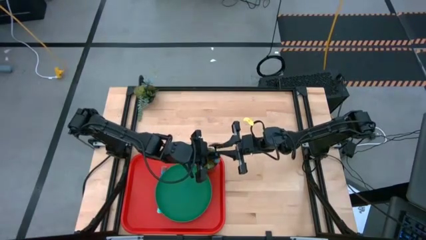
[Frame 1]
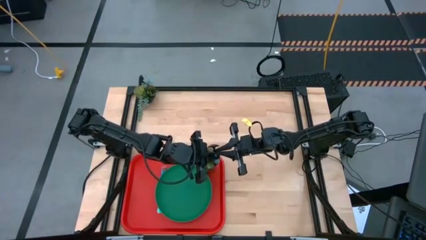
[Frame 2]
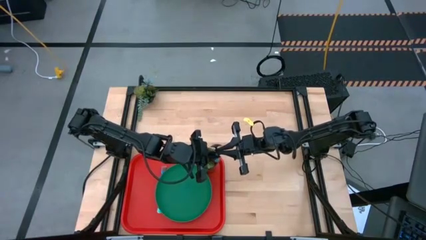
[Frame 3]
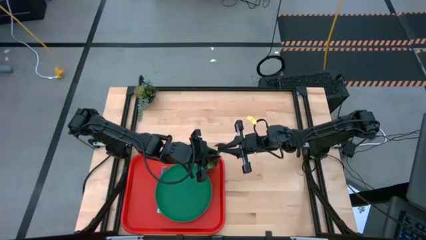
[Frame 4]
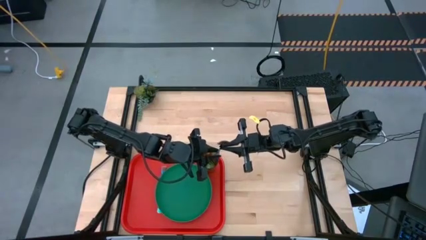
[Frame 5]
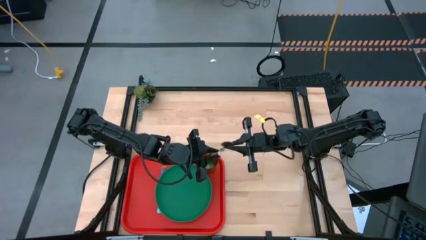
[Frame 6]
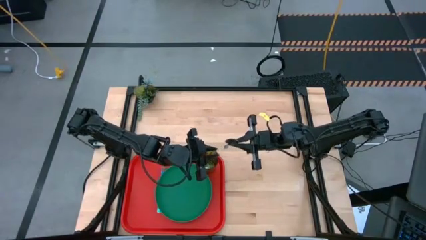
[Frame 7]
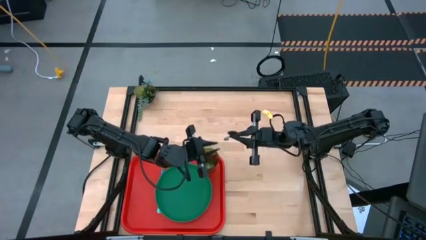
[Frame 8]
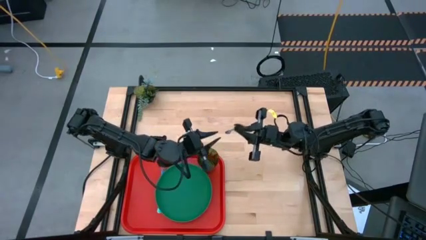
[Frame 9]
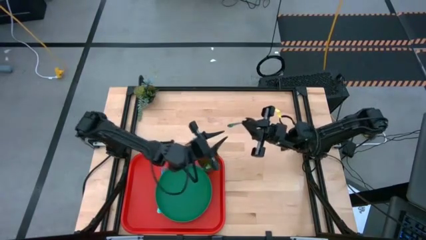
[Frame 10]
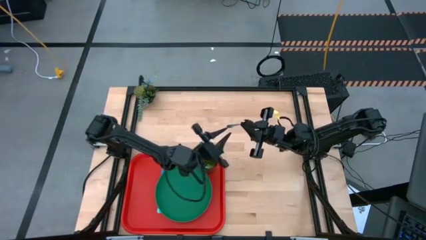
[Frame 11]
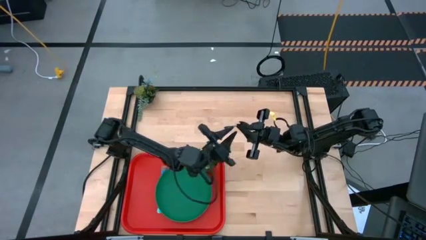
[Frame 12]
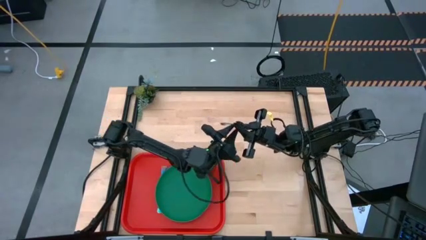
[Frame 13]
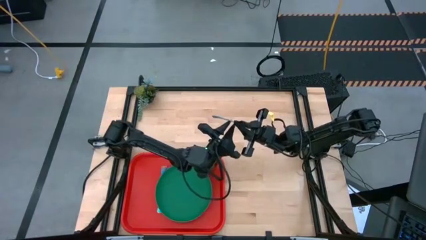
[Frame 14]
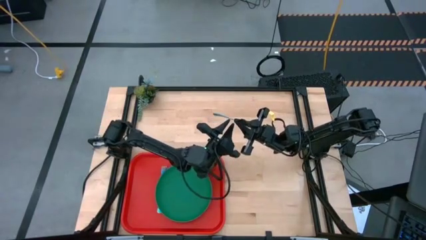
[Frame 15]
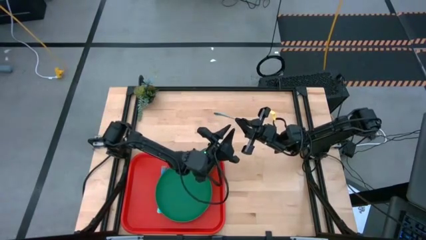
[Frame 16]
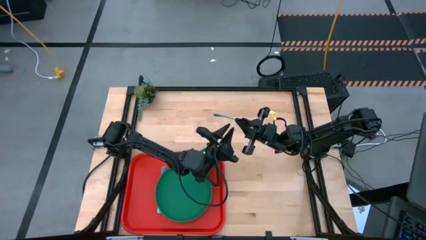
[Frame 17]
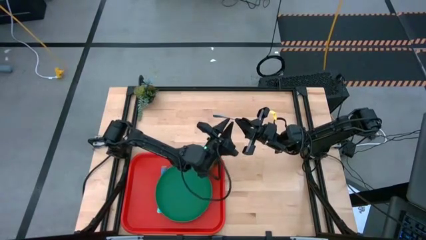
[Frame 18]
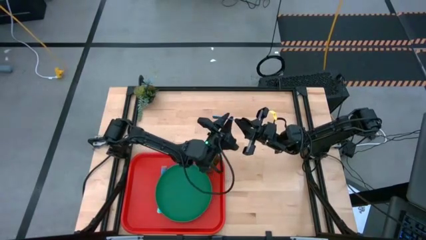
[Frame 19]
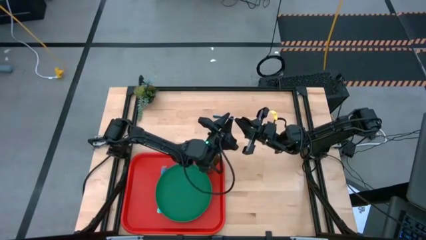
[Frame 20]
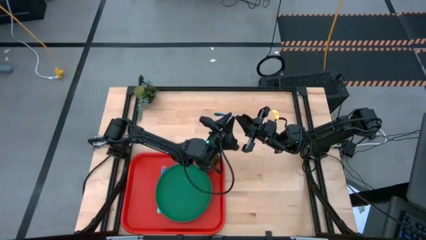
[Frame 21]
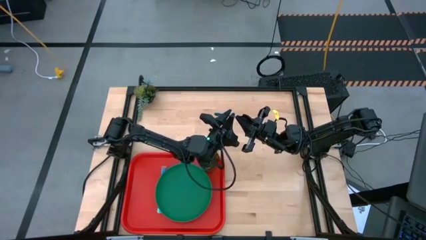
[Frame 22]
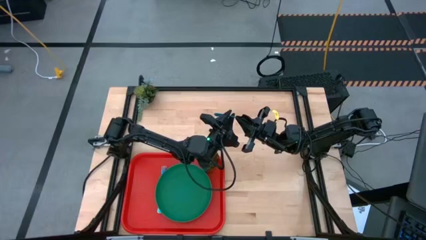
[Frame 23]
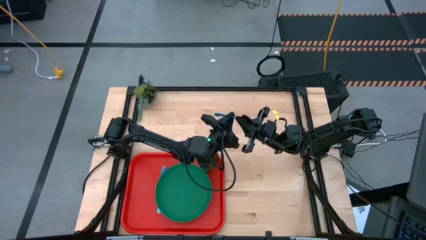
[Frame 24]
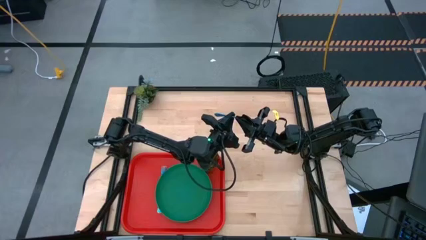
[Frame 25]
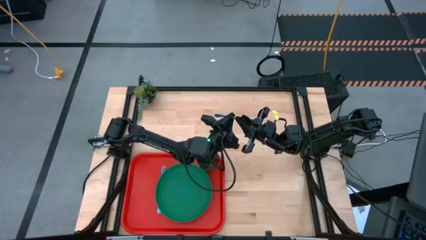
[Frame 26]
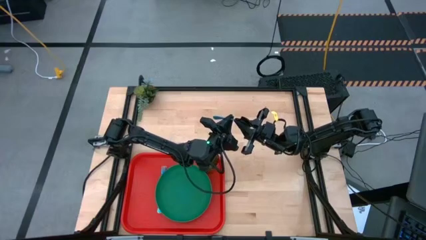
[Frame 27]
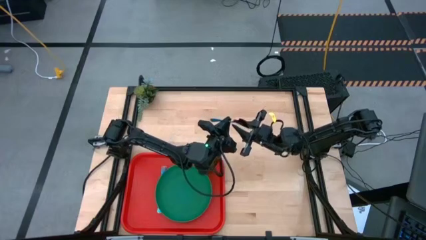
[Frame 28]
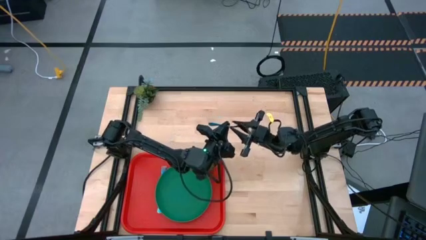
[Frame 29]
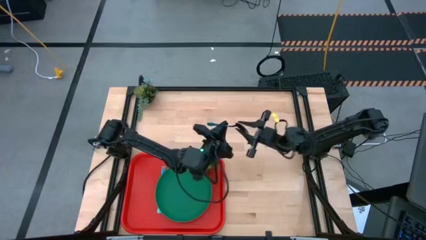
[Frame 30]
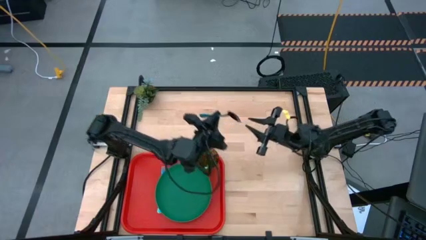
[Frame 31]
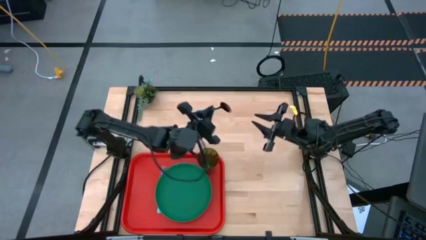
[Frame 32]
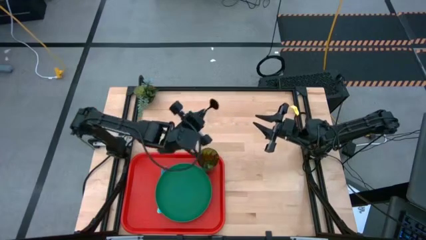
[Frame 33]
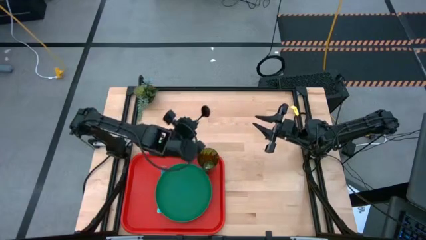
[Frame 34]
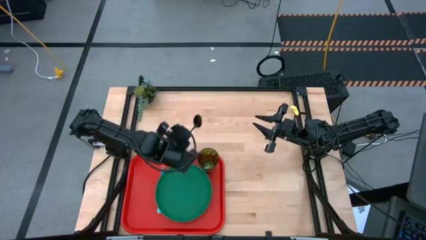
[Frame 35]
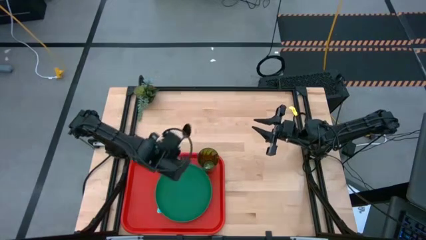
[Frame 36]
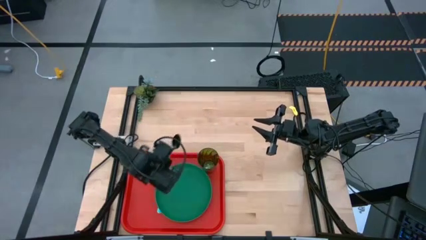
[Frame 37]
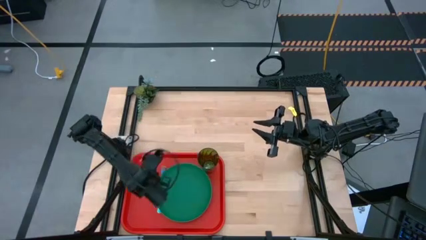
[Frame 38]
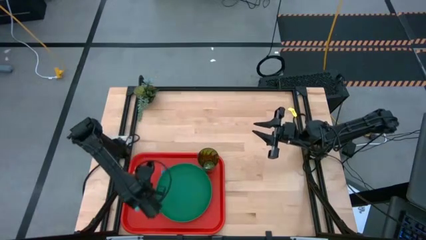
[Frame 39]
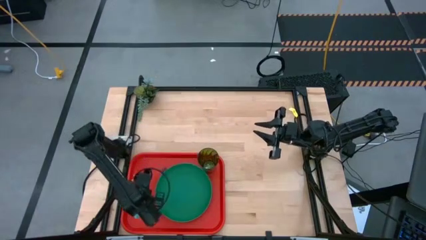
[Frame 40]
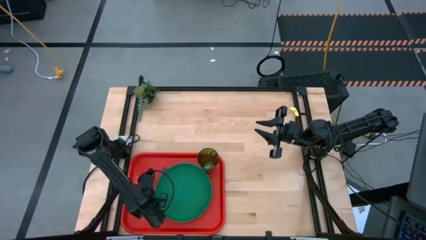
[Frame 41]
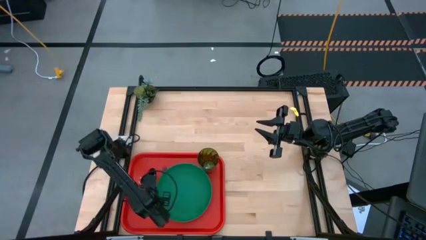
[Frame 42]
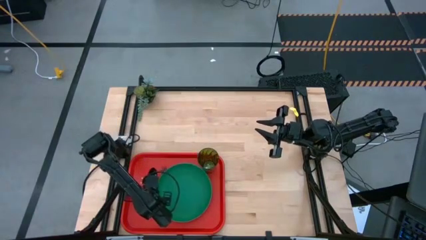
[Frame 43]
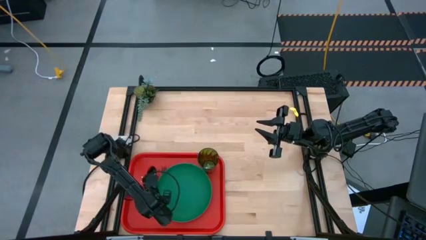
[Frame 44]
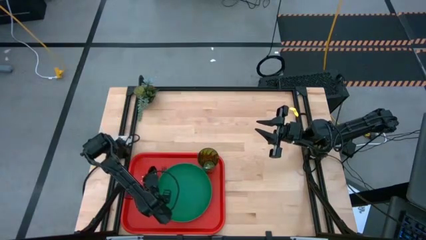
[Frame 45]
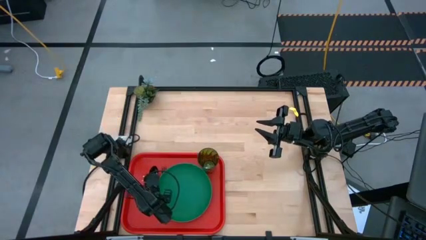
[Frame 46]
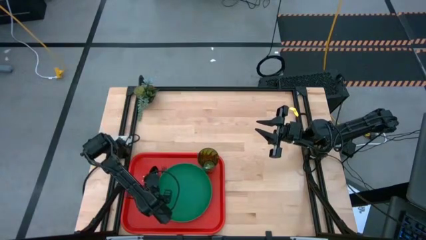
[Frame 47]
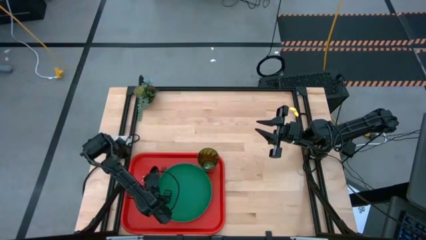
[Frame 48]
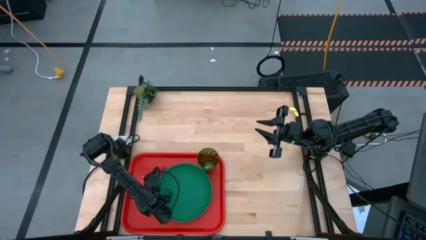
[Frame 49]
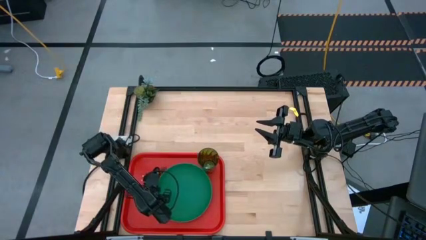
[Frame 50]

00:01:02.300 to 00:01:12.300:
Task: Pick and place plate/cup/fork/spoon on tray
Put the blue spoon on the red tray to the left of the purple fork

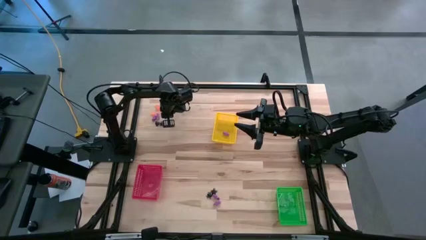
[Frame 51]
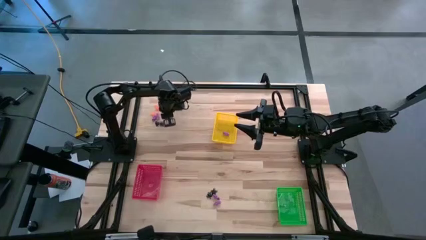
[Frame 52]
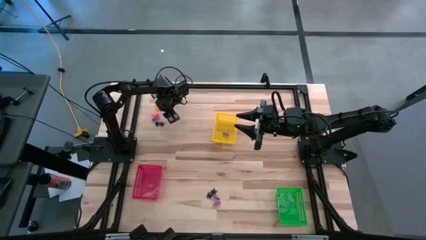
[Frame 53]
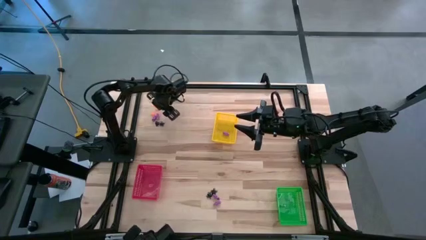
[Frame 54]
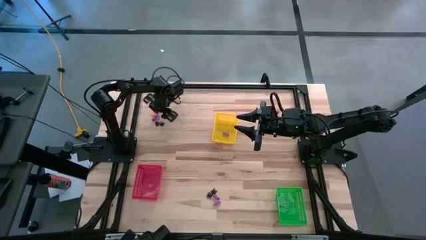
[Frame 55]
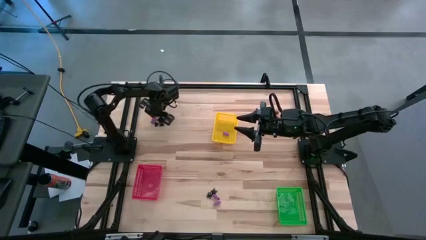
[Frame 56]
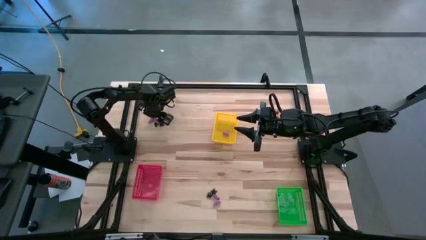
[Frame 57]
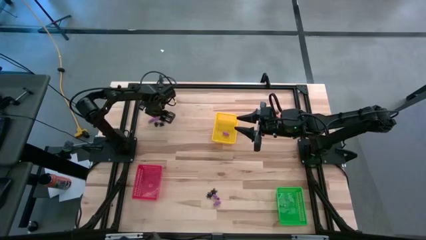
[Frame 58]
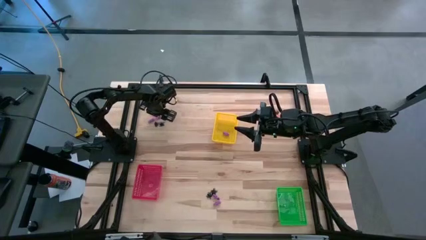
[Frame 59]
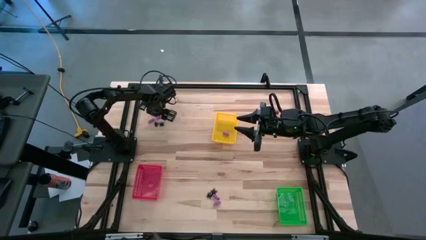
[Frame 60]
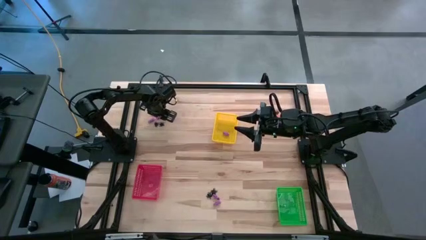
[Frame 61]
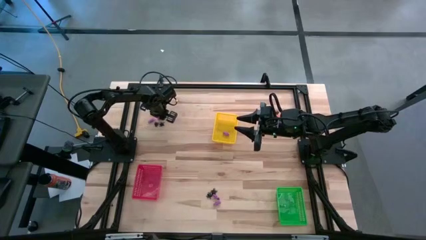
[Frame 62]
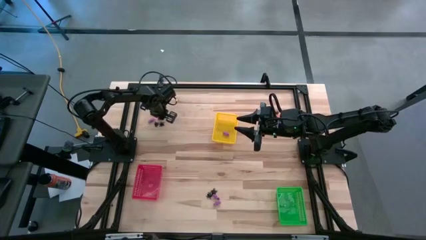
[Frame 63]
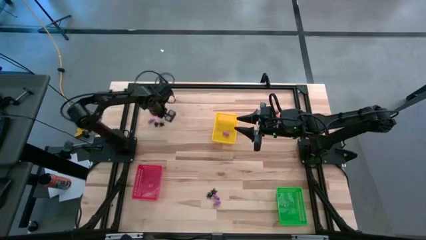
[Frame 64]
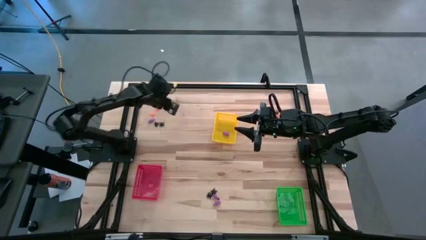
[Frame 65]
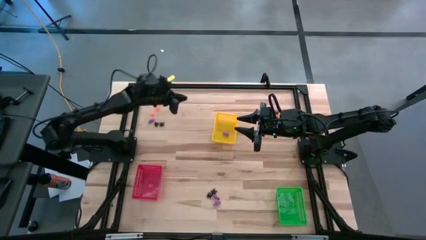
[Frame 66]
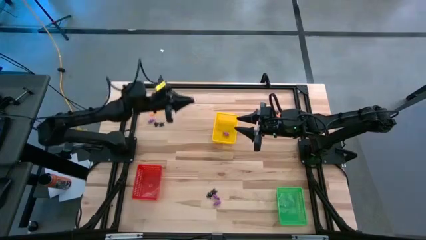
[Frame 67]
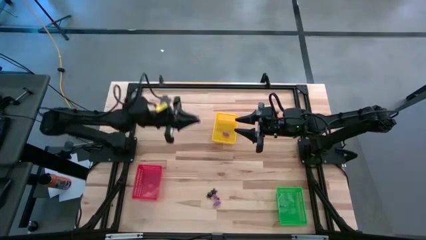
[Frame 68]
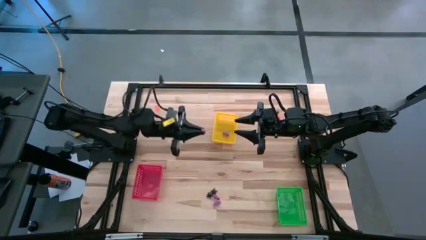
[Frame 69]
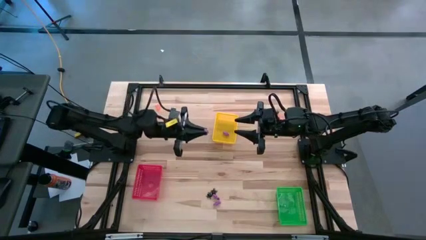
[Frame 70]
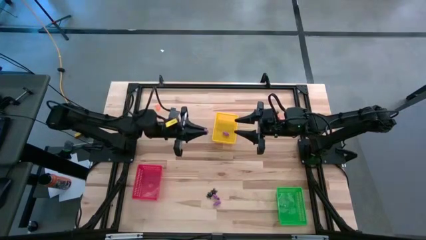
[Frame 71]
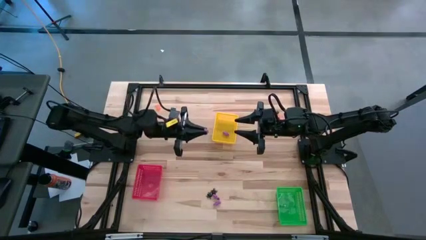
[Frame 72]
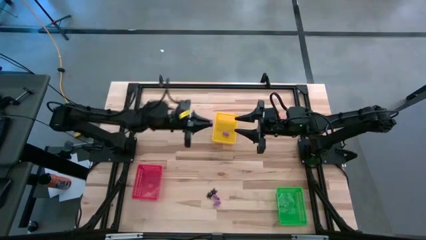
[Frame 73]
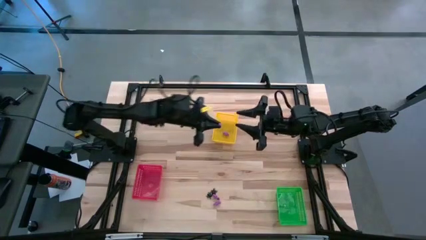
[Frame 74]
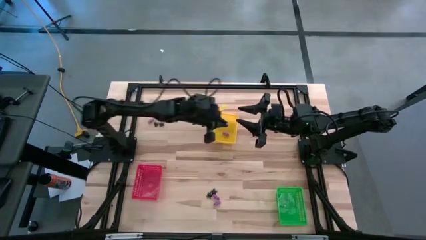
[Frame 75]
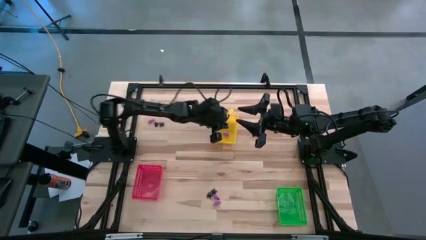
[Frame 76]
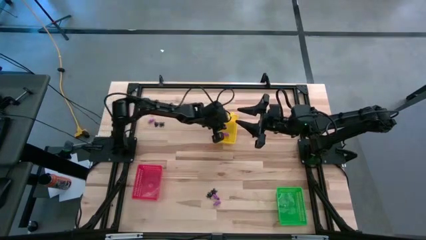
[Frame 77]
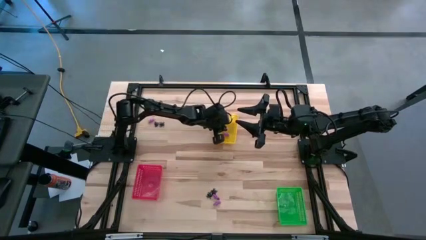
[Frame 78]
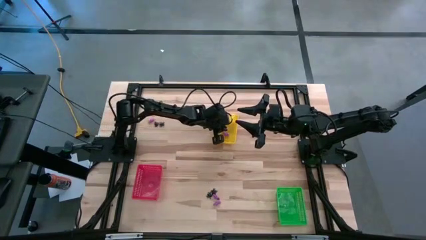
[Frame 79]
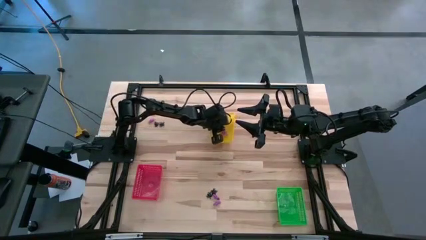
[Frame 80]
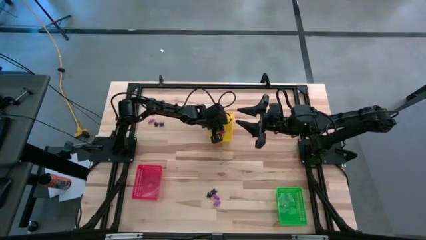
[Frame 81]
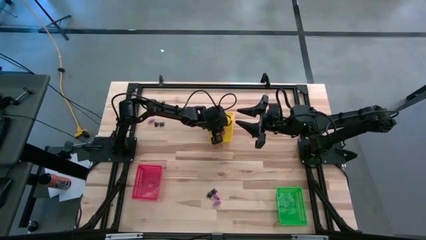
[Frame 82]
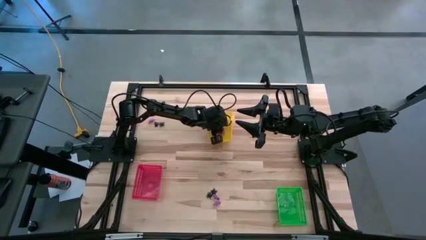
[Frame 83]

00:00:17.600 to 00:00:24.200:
Task: Sort Halloween decoration
Put the skeleton toy into the yellow bin
